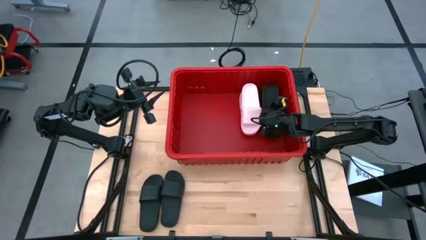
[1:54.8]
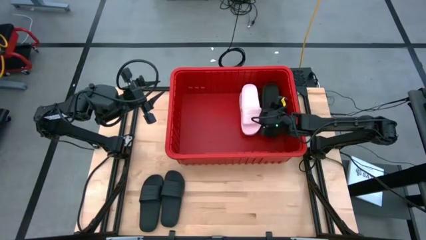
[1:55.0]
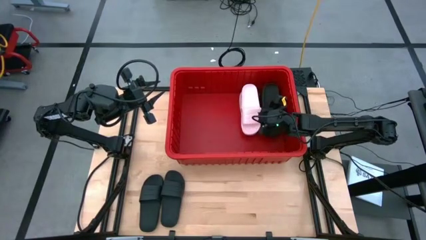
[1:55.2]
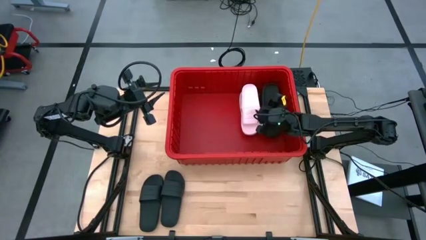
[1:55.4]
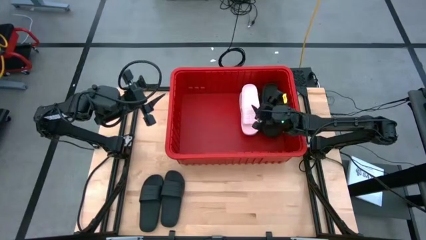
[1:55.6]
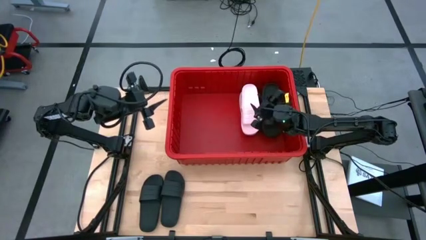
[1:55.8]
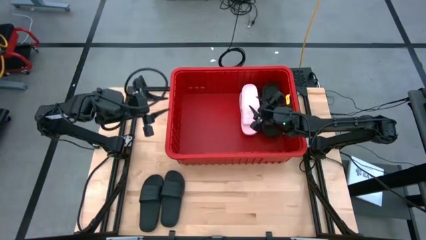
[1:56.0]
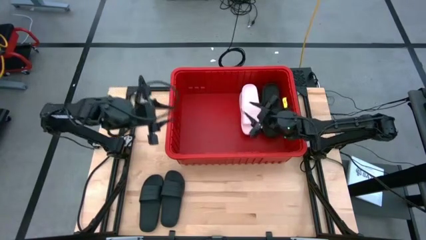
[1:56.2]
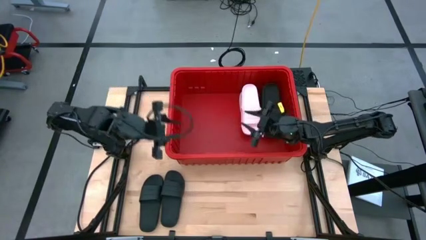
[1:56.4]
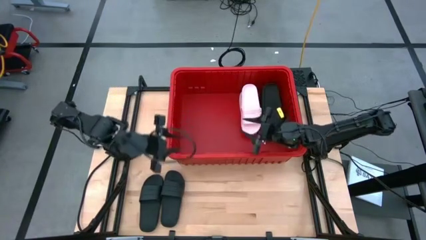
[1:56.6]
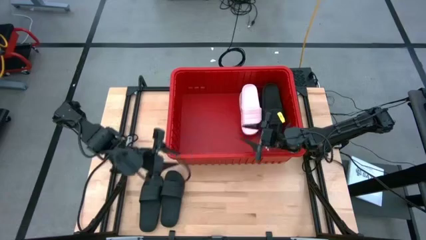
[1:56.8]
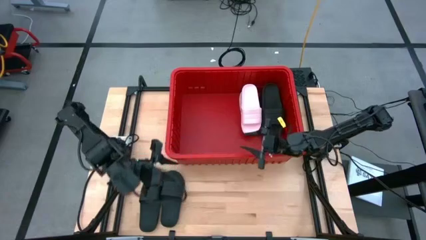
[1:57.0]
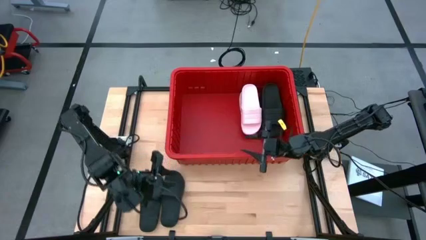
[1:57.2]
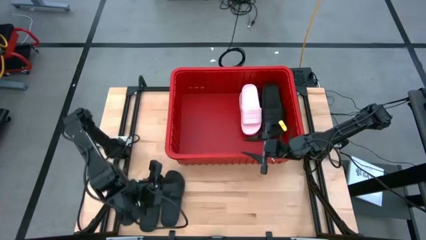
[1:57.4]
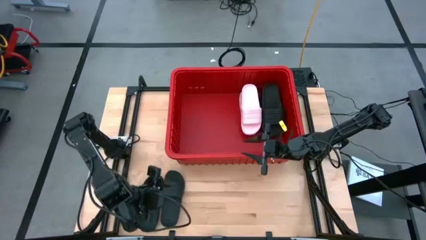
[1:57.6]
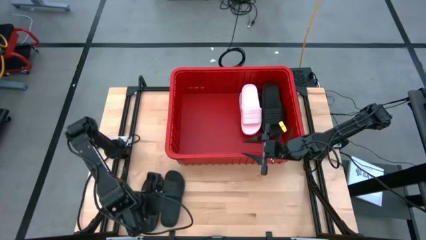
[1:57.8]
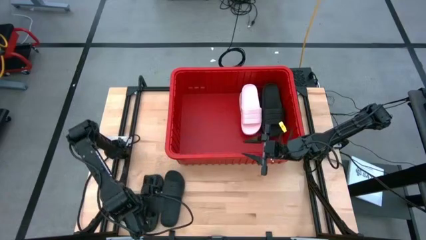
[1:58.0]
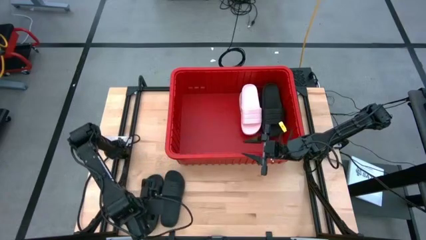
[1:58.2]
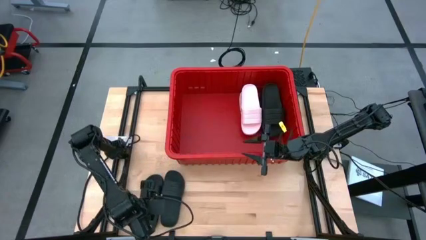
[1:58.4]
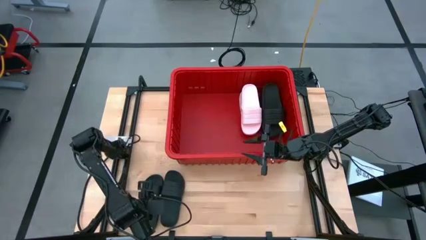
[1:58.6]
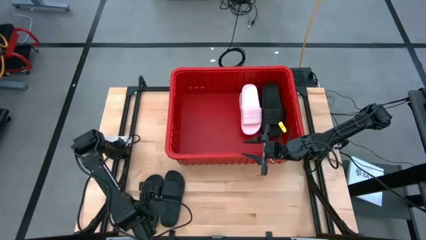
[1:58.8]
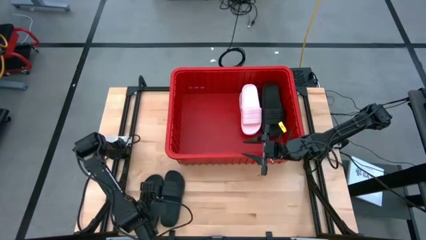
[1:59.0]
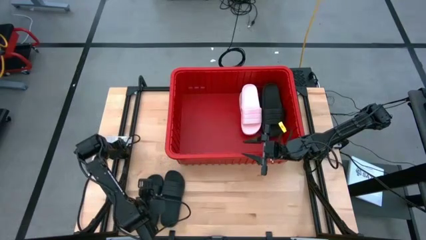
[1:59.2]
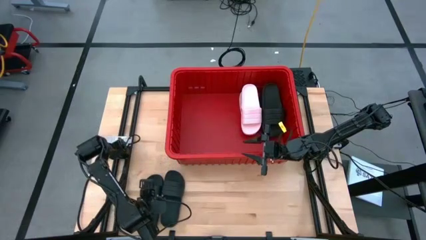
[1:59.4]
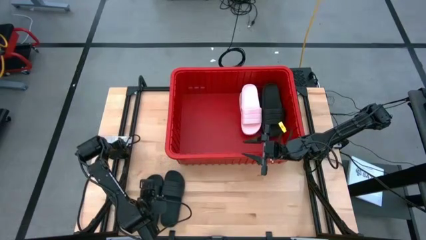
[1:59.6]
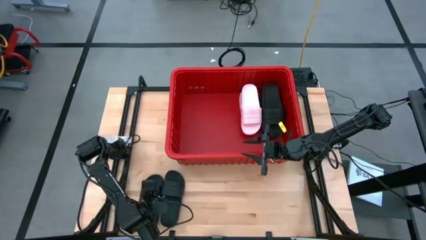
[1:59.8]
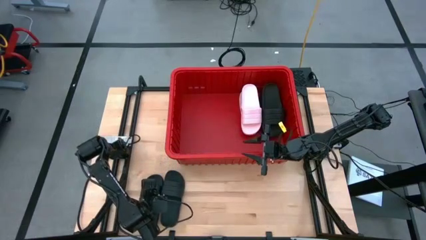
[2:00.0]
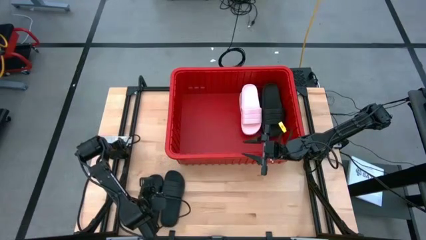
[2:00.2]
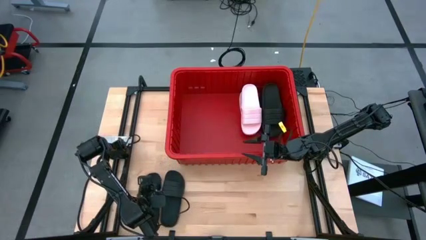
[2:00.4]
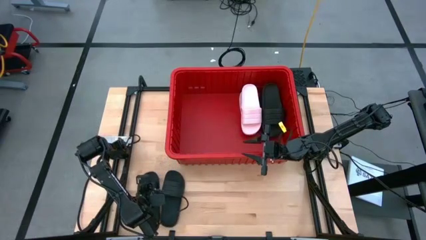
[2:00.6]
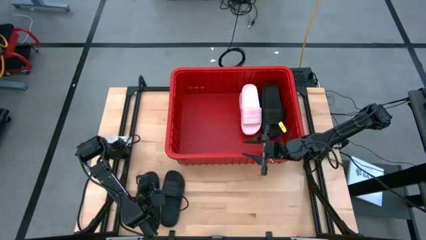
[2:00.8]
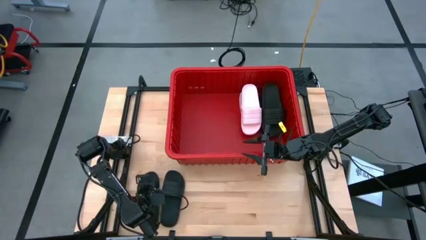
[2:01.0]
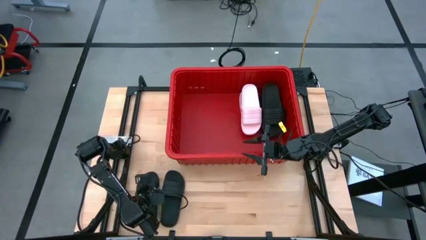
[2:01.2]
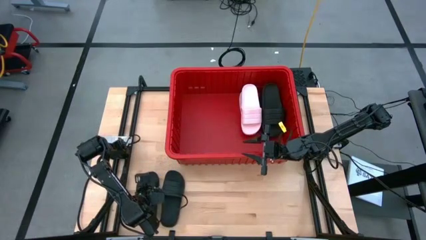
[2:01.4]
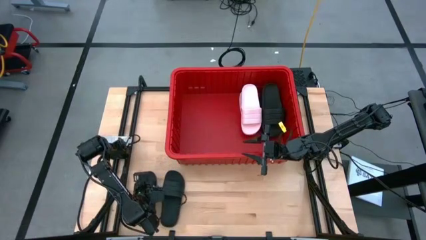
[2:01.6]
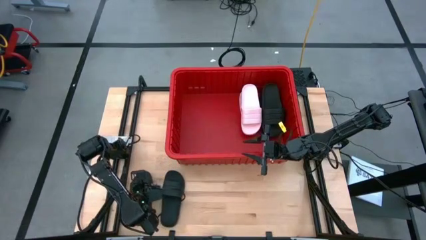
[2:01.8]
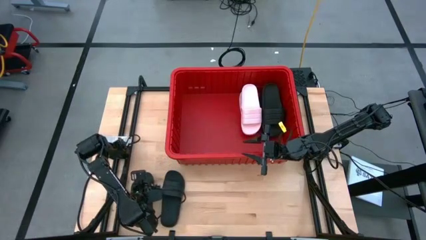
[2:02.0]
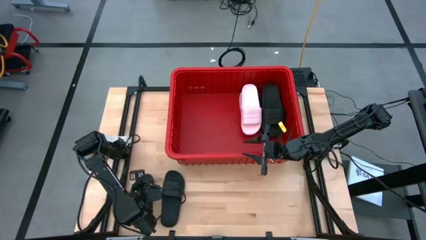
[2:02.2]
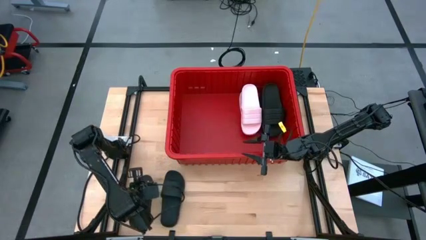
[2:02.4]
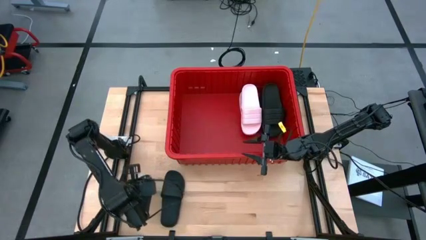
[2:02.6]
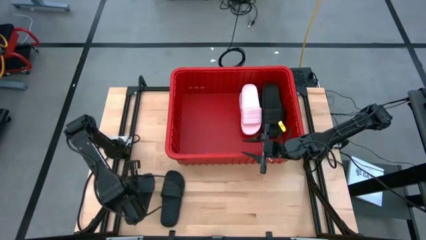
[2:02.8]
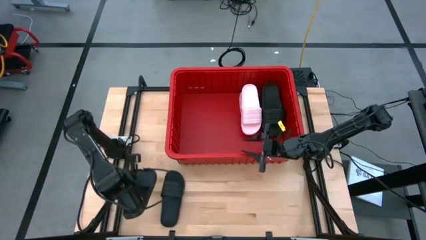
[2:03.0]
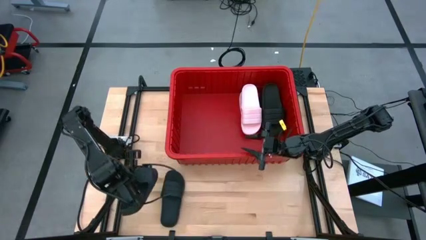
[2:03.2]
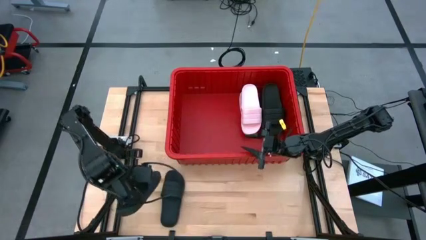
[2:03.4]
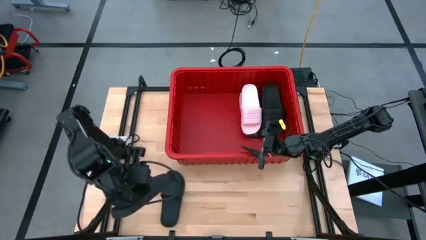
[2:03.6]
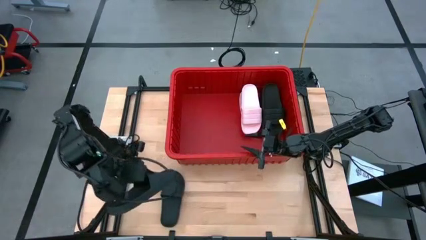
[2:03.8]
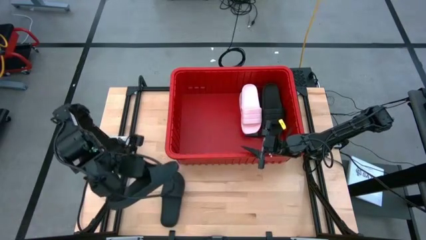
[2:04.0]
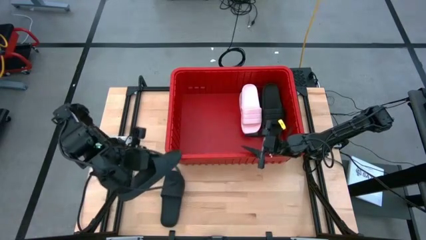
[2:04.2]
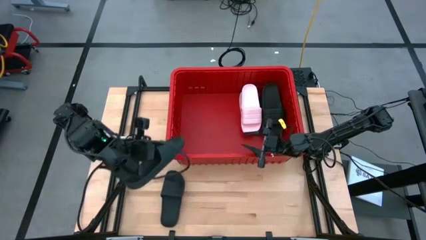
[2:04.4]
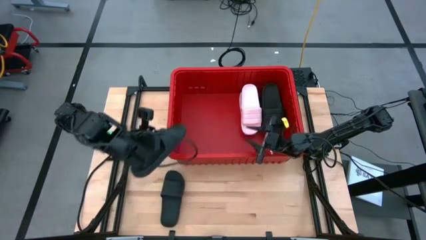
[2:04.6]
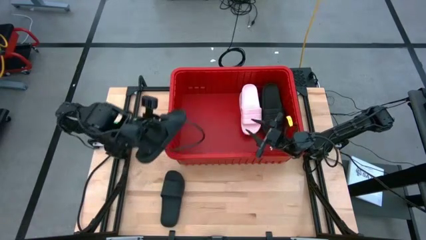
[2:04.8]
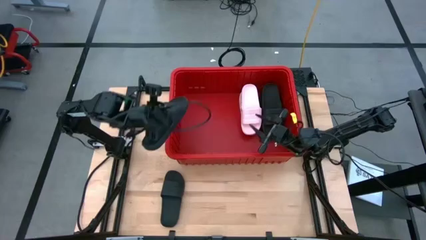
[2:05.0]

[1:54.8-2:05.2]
Task: Pick and place slides into bin
Put the black slide into the red organizer bin
